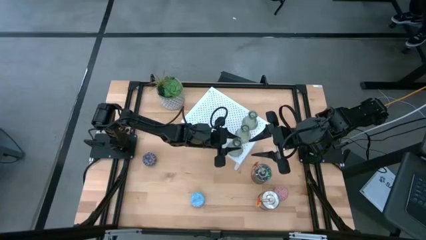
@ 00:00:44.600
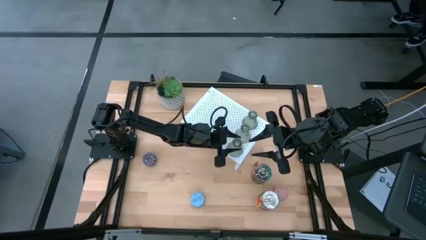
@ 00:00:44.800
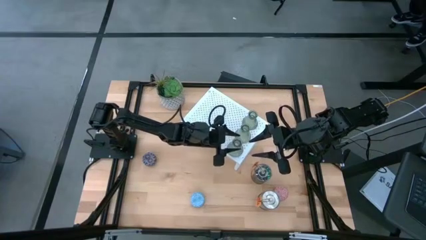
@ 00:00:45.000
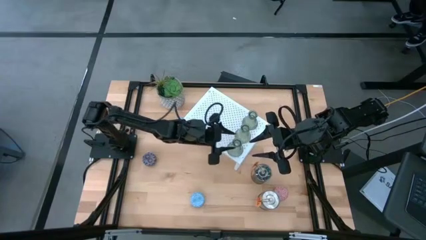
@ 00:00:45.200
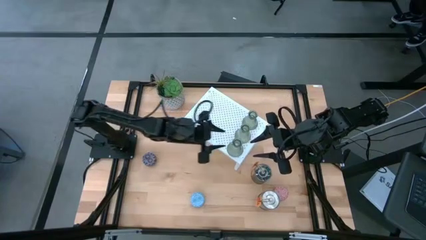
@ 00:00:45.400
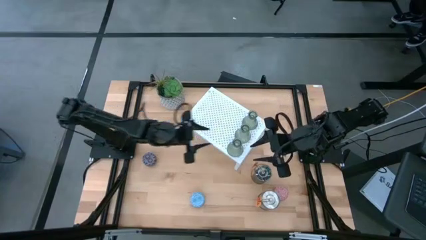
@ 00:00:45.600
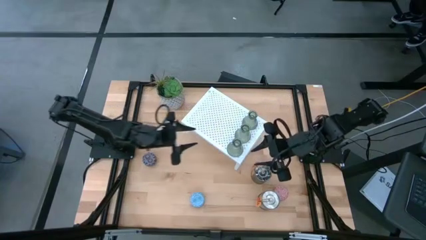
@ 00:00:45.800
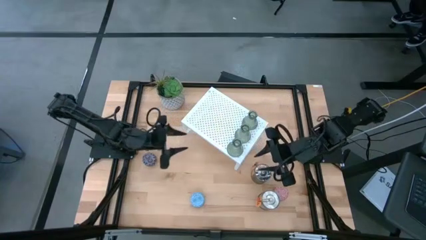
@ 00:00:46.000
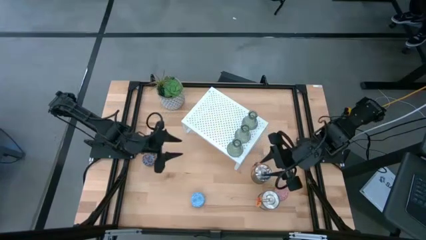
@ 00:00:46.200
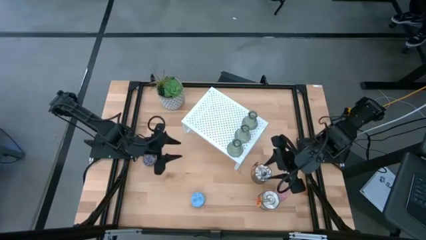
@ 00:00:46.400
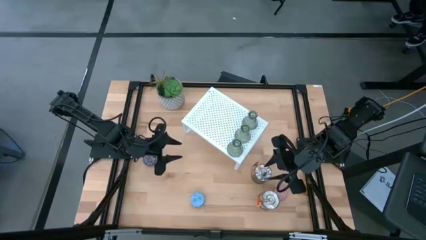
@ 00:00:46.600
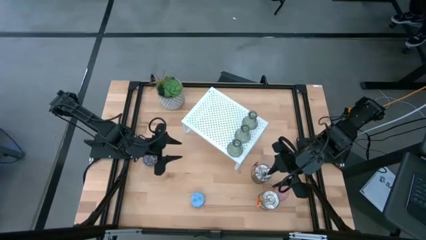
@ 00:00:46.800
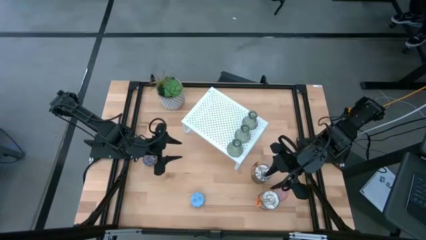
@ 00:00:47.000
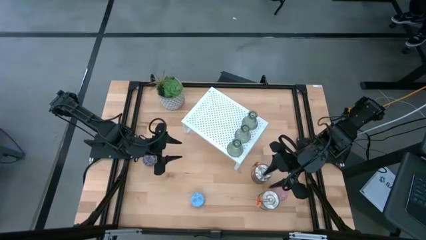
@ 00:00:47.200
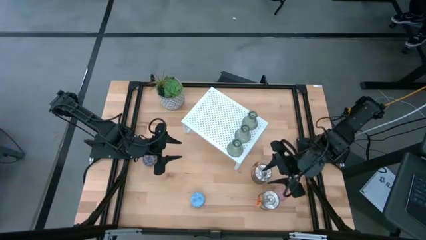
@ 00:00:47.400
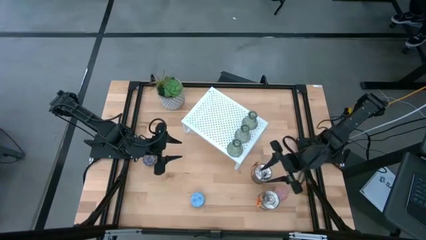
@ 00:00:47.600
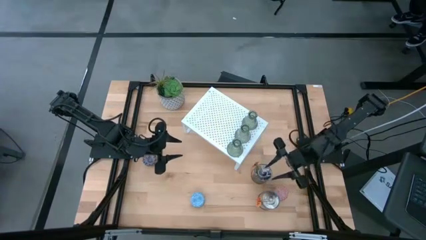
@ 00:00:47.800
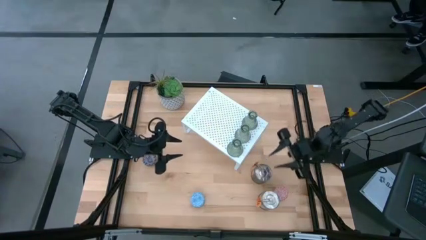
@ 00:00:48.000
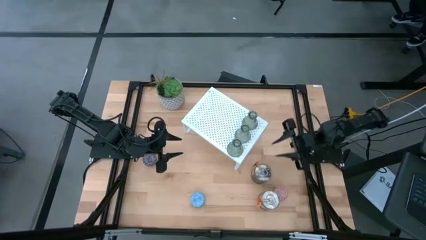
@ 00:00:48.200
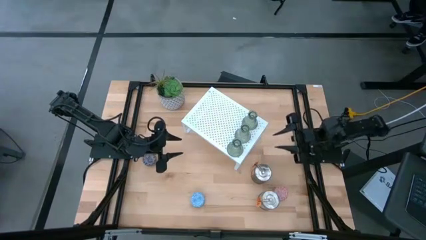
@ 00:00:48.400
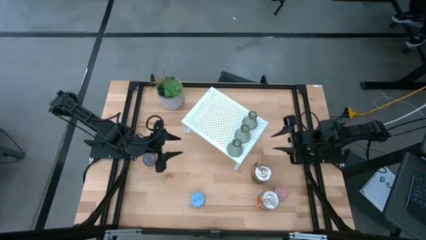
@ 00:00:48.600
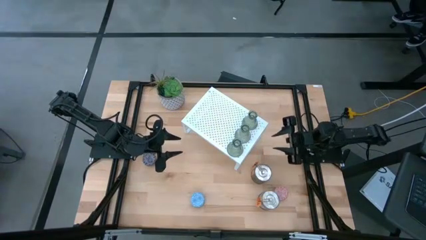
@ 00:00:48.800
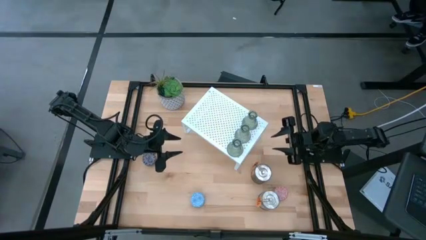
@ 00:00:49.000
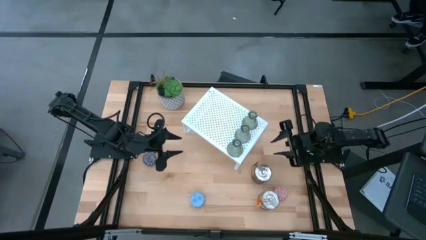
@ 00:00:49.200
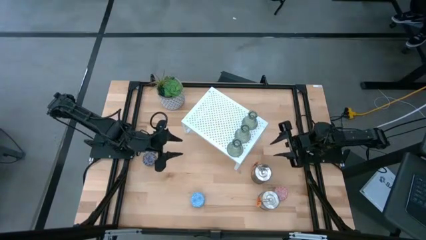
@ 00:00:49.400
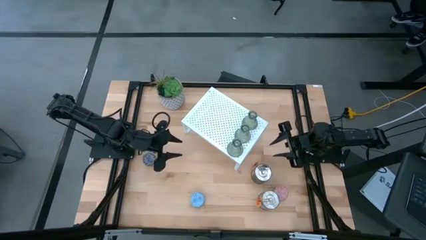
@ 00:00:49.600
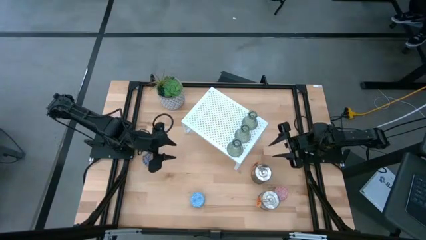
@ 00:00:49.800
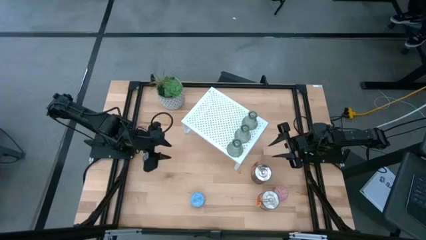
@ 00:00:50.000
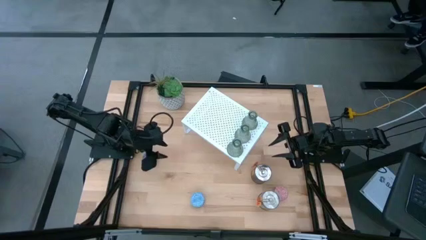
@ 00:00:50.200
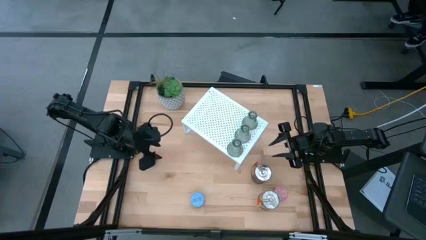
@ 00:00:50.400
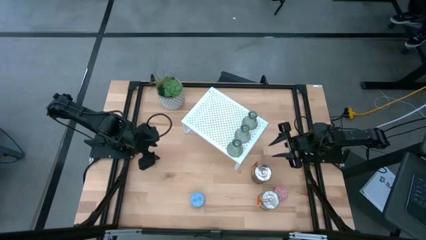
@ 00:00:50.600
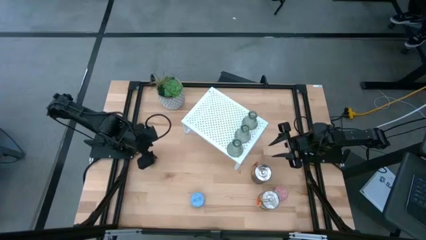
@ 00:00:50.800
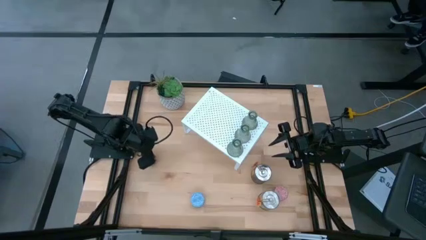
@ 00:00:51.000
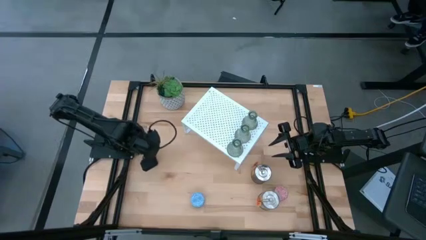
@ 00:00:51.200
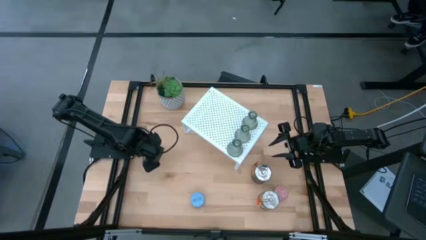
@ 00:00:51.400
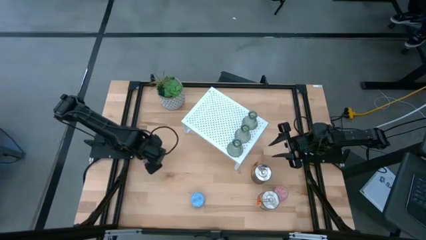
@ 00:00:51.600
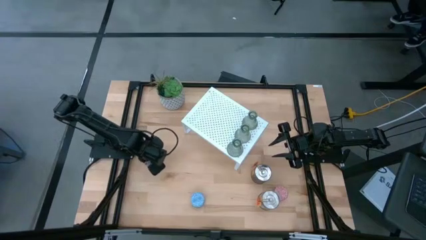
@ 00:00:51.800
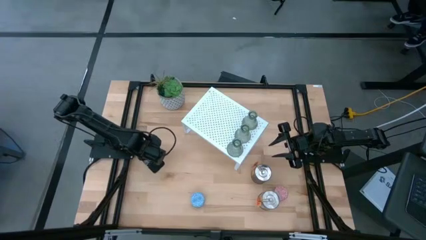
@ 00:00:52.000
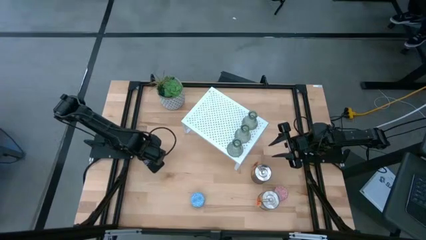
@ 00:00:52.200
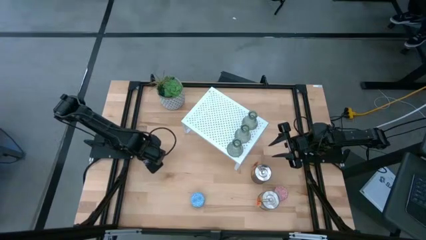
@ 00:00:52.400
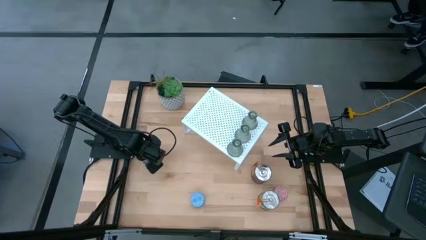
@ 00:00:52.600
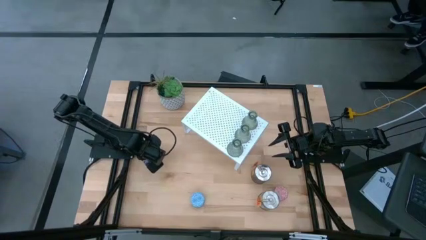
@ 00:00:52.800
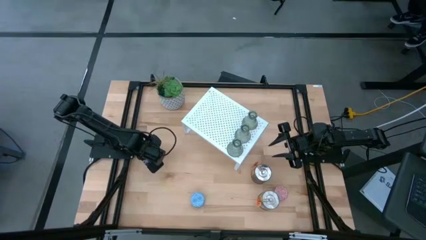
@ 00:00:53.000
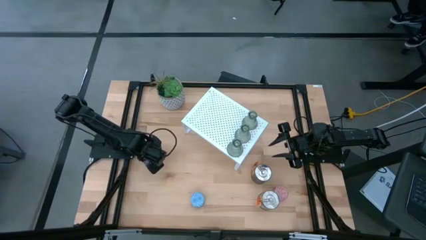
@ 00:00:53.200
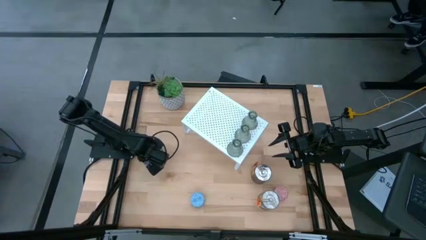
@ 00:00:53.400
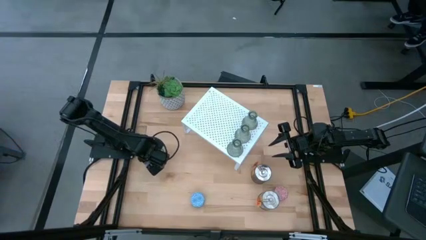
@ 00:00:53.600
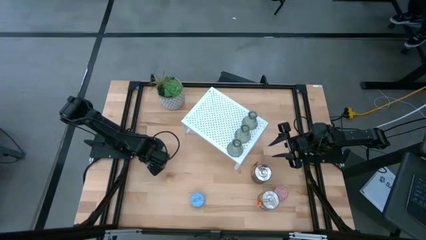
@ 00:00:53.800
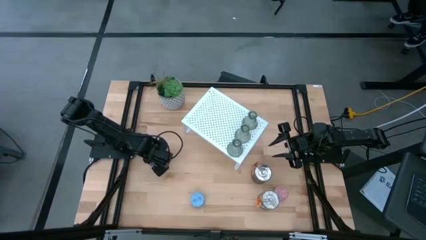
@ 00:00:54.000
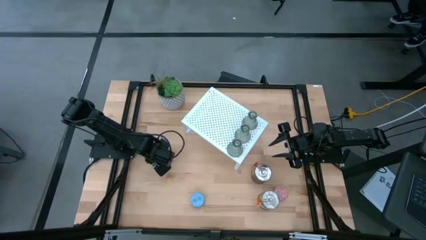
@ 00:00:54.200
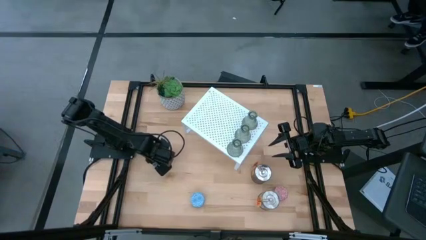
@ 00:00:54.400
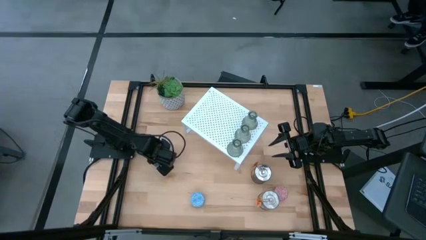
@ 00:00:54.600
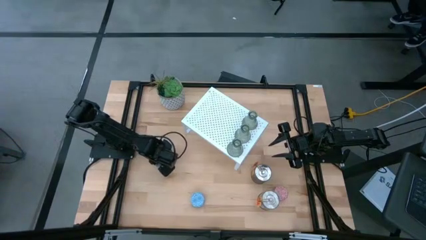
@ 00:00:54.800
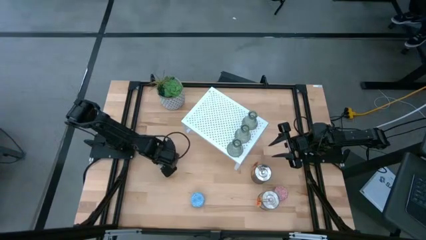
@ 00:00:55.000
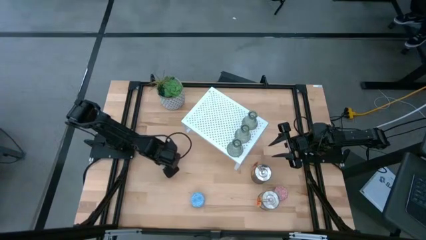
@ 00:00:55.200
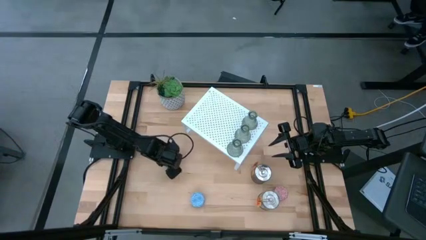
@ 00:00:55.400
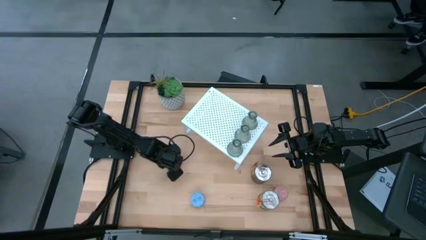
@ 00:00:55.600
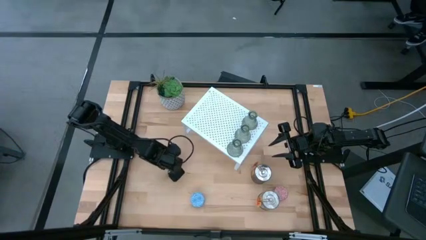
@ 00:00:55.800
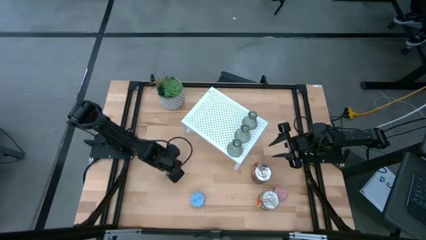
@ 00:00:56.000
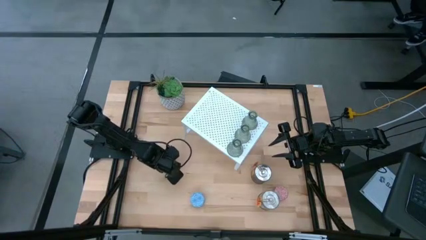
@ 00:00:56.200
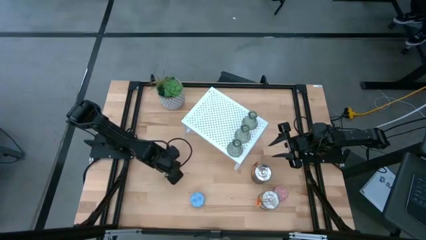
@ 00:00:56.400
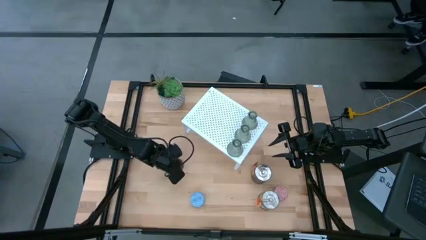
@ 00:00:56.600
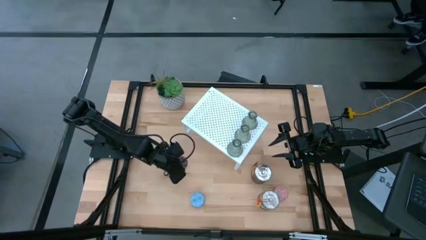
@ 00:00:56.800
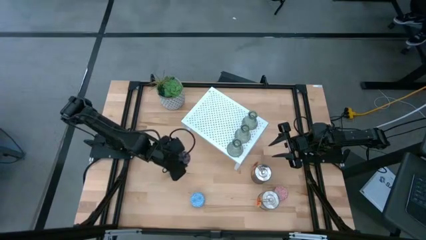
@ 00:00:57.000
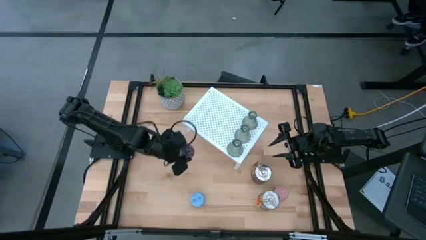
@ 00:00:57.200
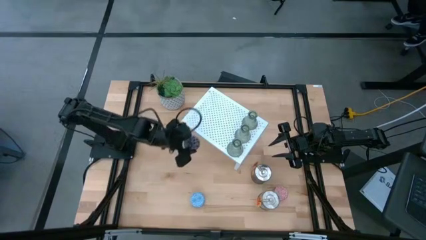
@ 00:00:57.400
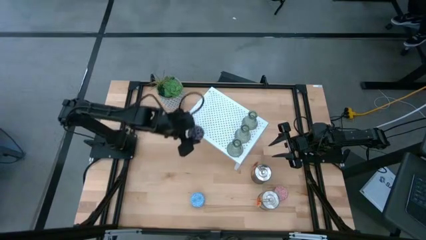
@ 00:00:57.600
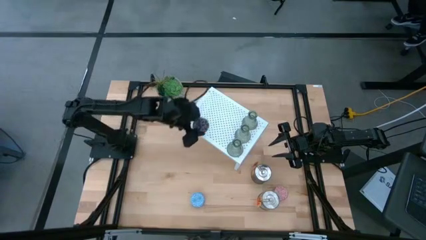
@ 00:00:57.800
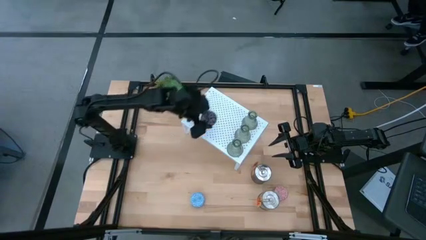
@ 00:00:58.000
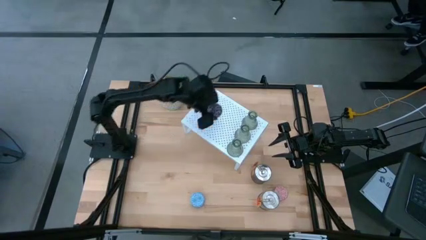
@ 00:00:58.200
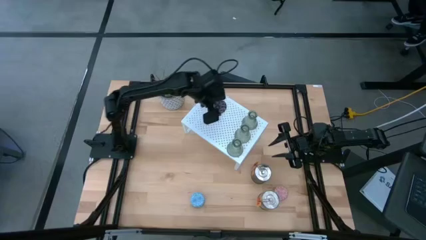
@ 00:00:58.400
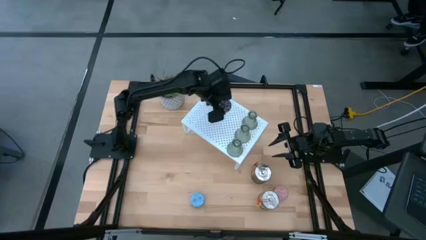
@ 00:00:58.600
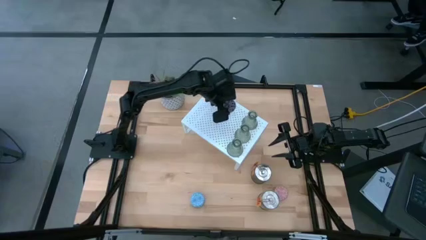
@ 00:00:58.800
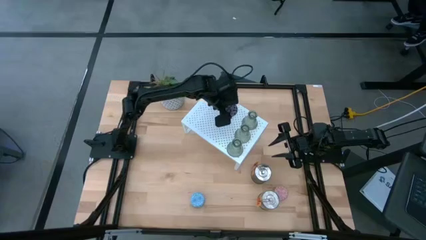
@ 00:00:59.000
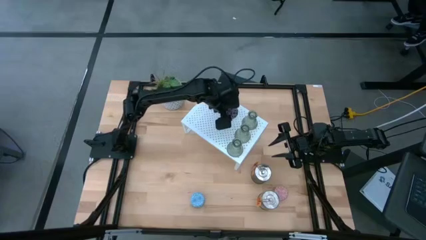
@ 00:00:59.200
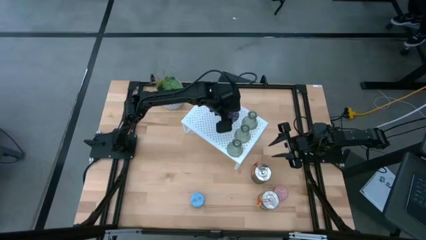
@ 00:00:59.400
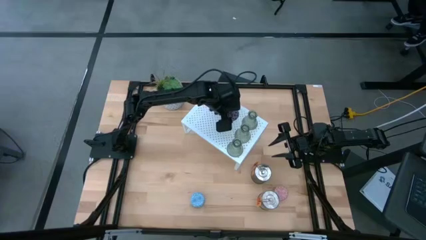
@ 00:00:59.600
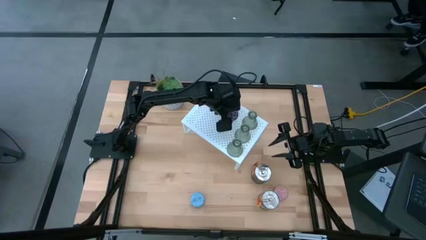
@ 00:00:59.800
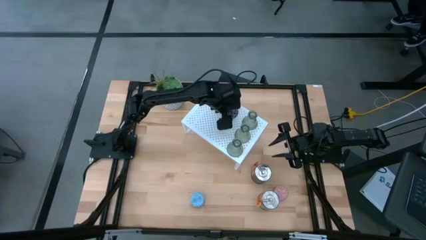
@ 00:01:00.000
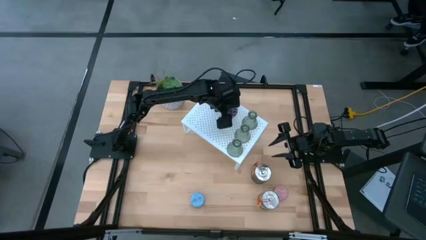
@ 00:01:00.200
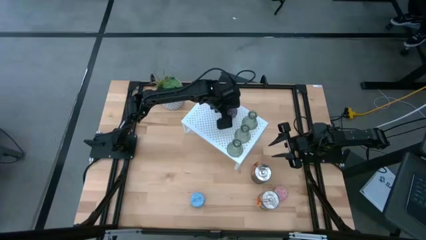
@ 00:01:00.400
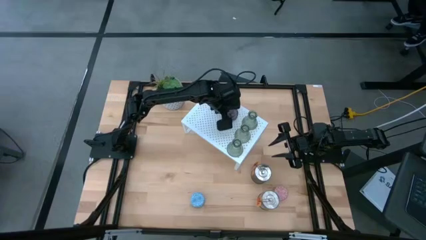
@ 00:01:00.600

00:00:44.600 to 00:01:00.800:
Task: Pick & Place candle stick holders
Put the black patterned scented candle on the shelf
